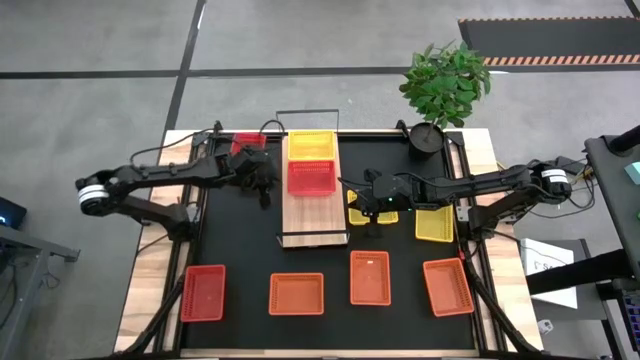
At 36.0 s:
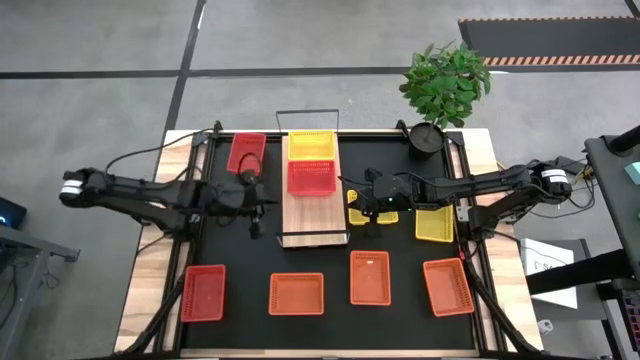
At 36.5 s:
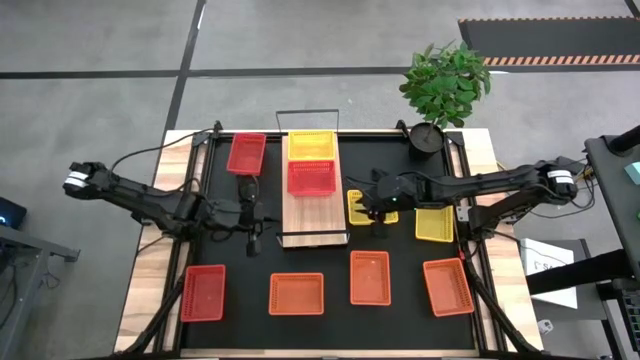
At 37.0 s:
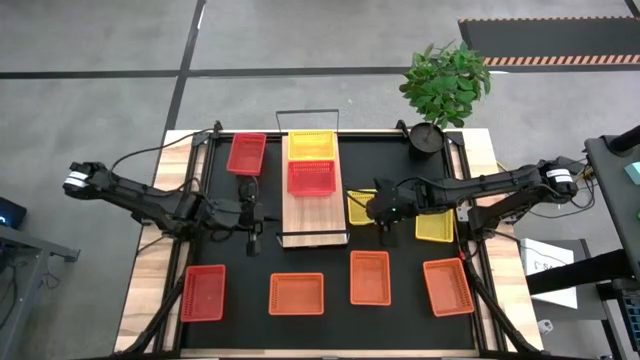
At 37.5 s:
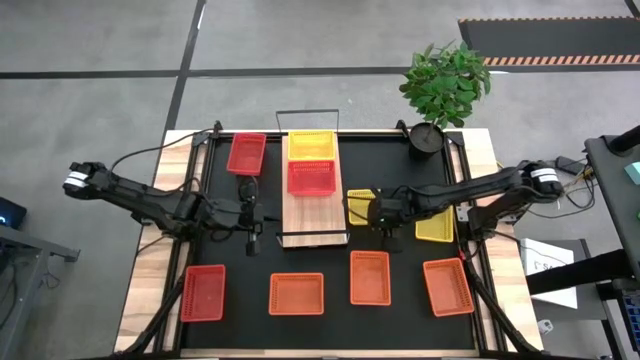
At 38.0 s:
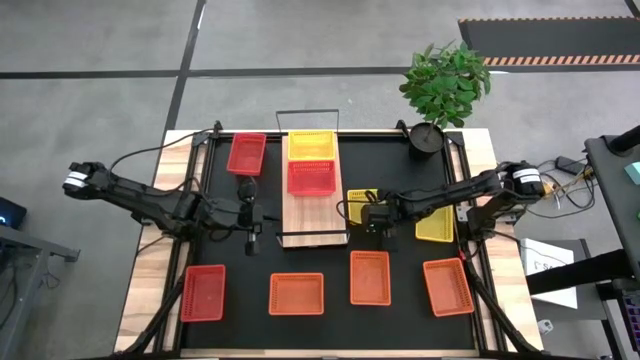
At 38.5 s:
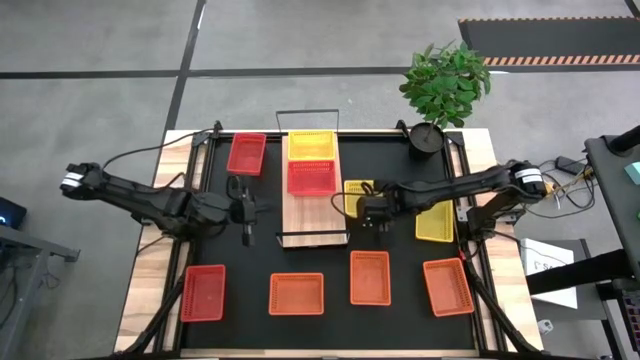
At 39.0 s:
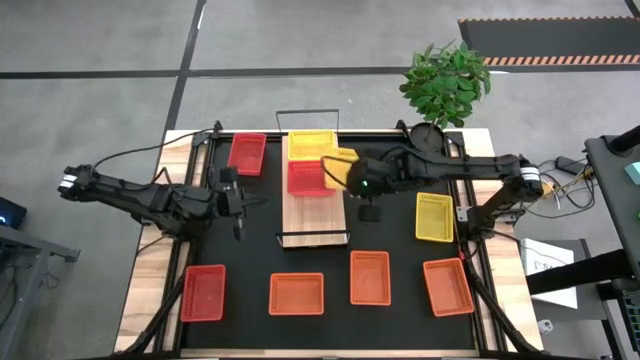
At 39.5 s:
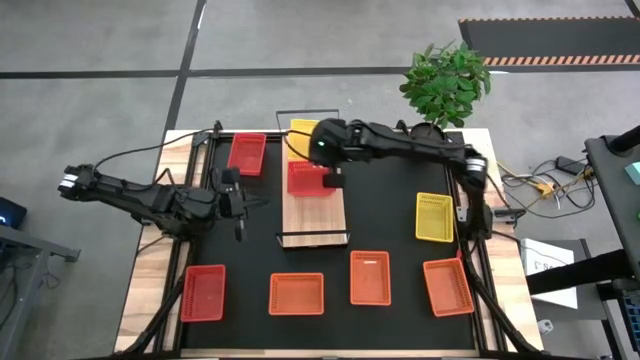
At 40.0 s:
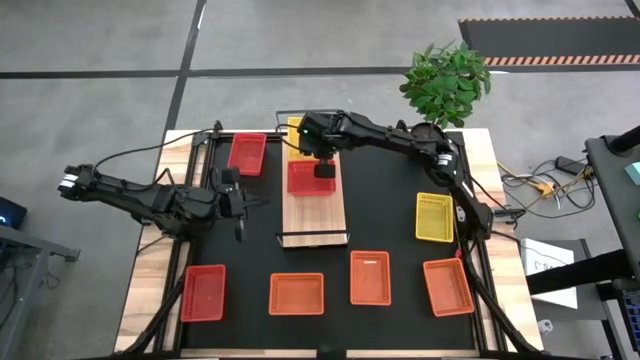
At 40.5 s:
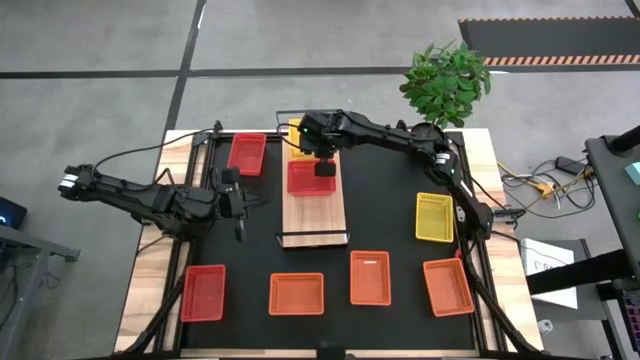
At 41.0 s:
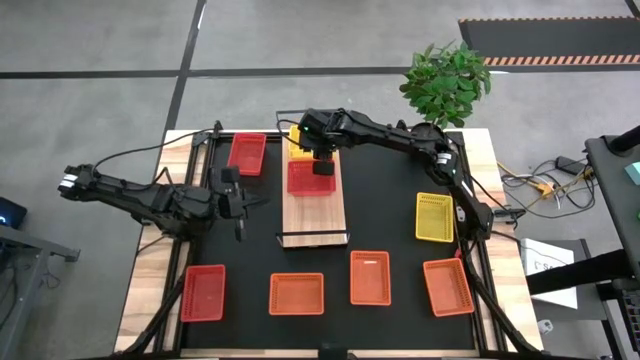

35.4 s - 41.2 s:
Task: Stack baskets on shelf by color
Stack the left yellow bin on the top of the yellow bin on the shelf

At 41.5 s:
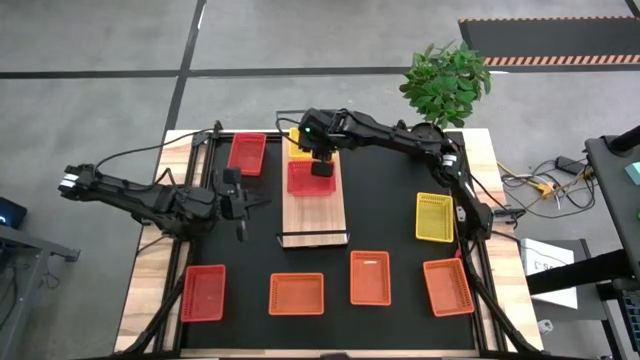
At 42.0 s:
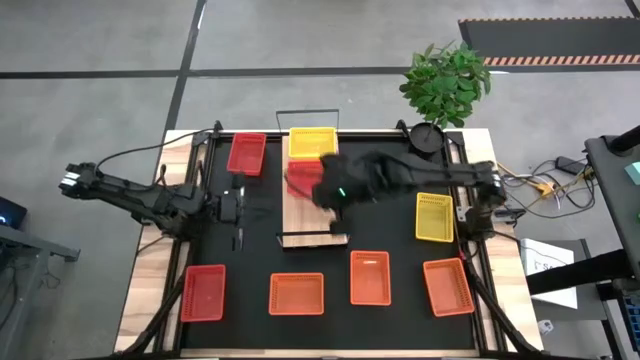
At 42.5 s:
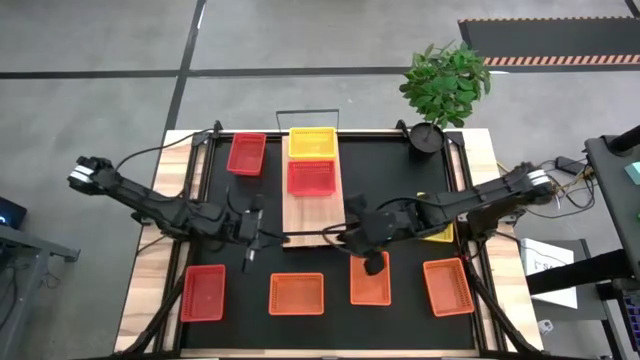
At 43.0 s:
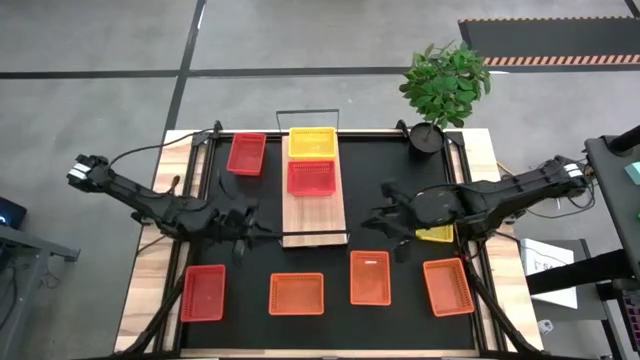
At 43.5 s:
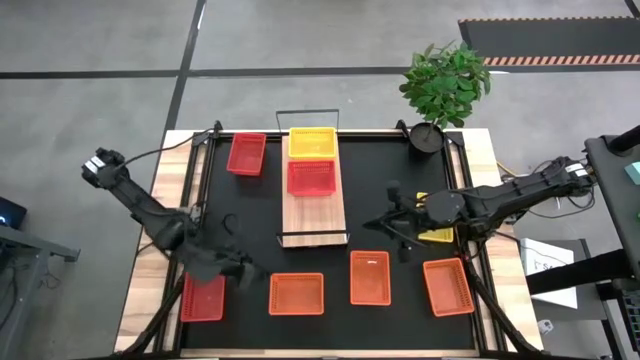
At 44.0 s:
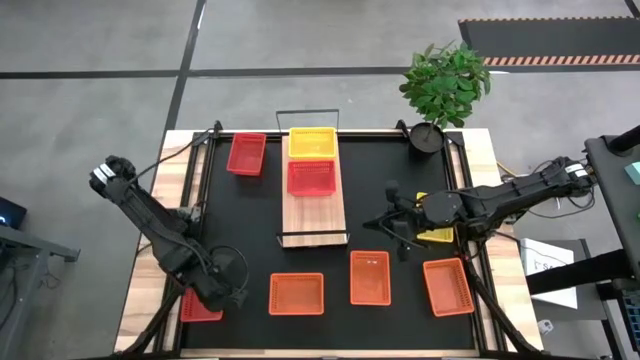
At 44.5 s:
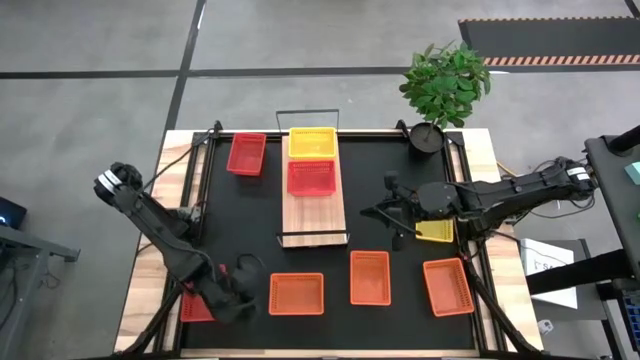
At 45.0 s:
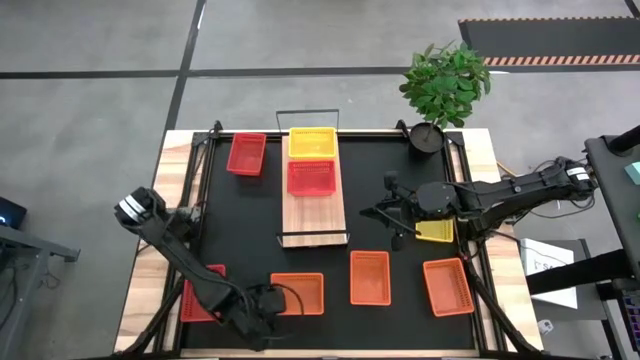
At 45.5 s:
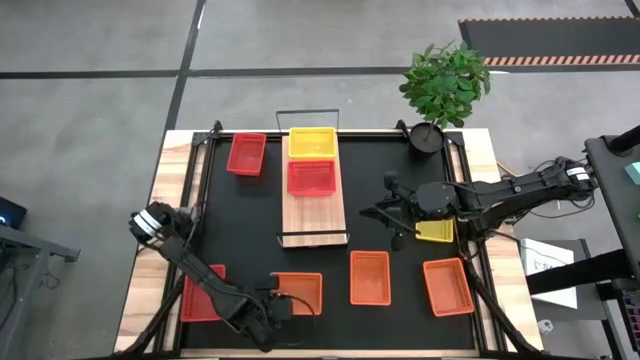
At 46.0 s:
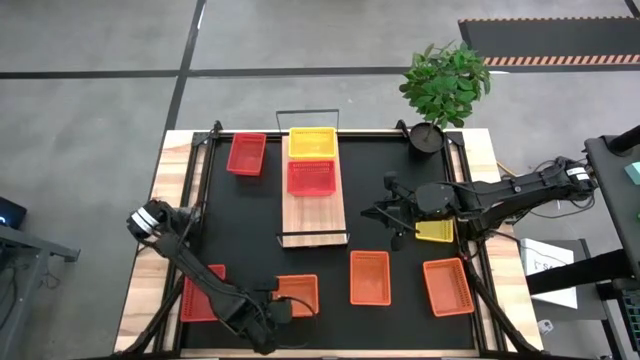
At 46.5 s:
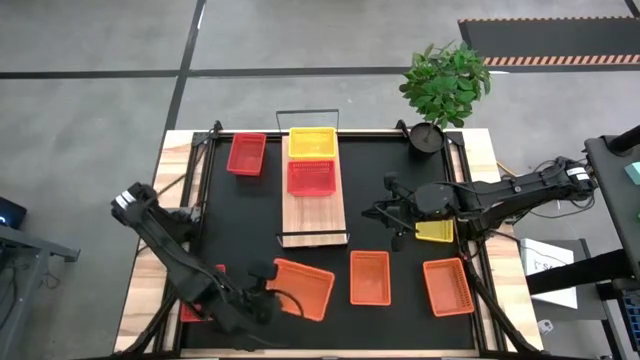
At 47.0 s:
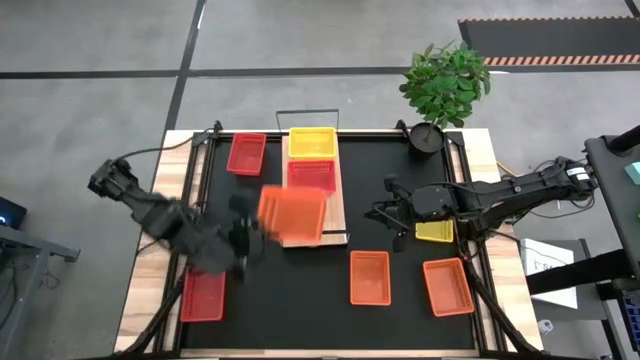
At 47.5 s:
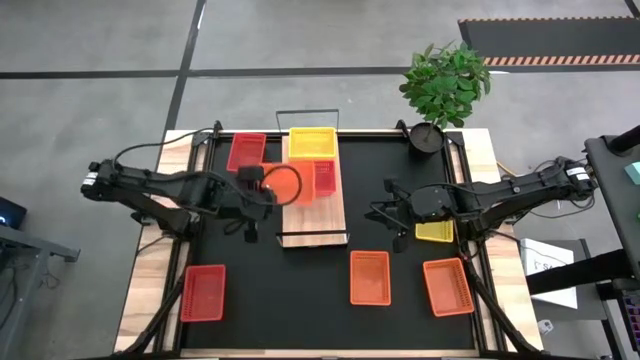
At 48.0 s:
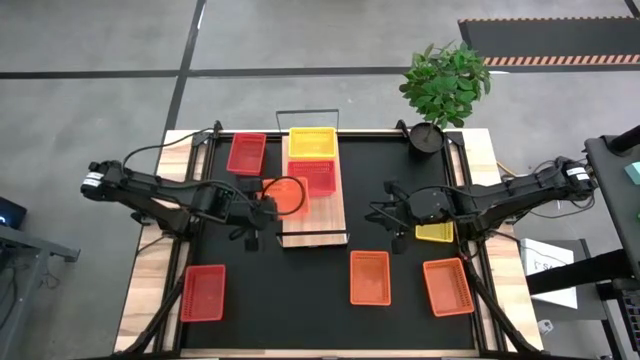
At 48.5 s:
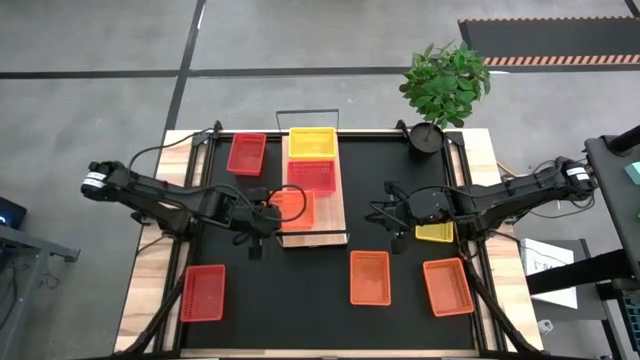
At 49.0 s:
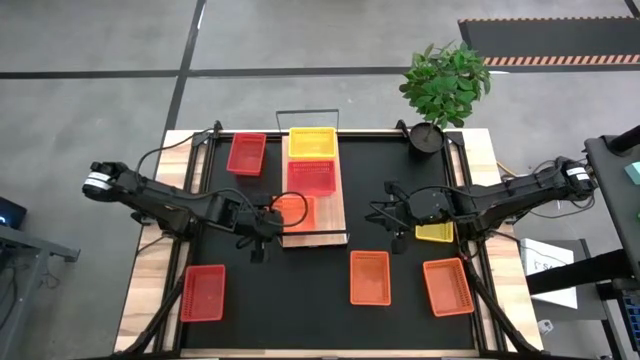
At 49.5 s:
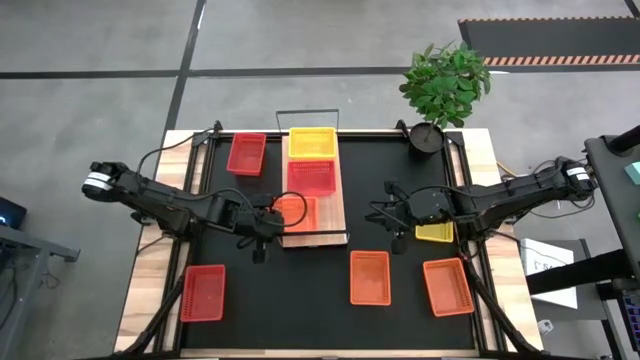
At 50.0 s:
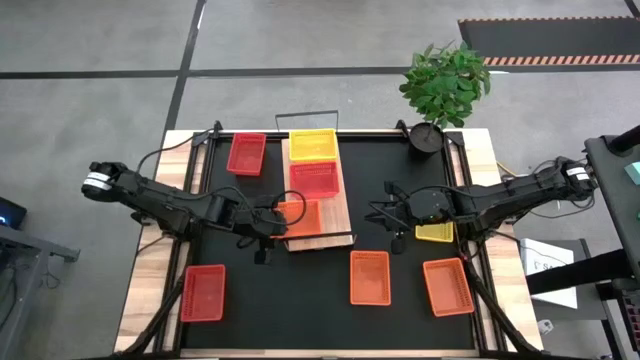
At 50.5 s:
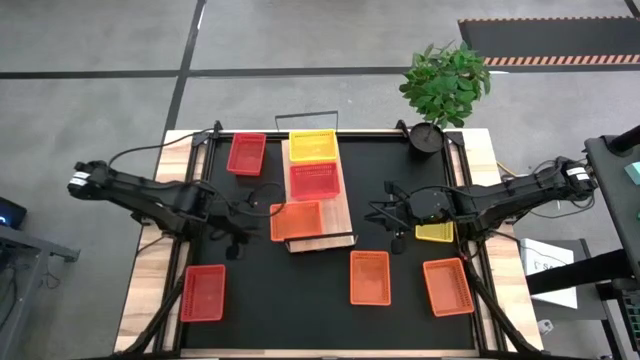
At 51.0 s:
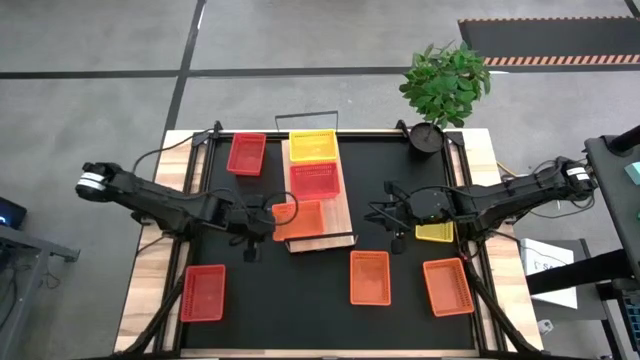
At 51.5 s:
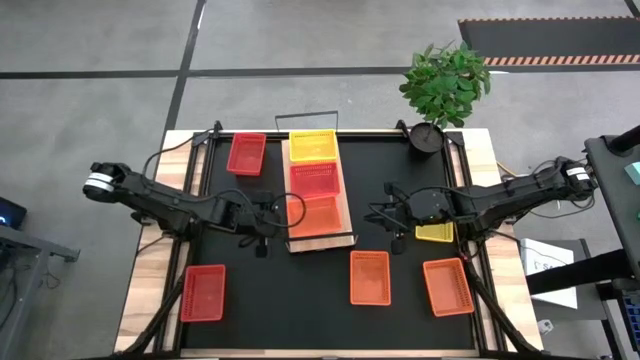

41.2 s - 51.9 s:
Put the left orange bin on the shelf

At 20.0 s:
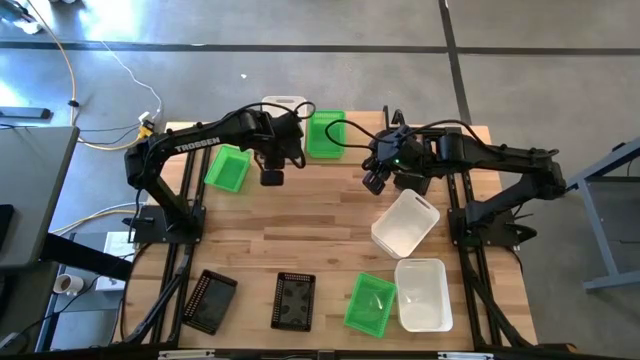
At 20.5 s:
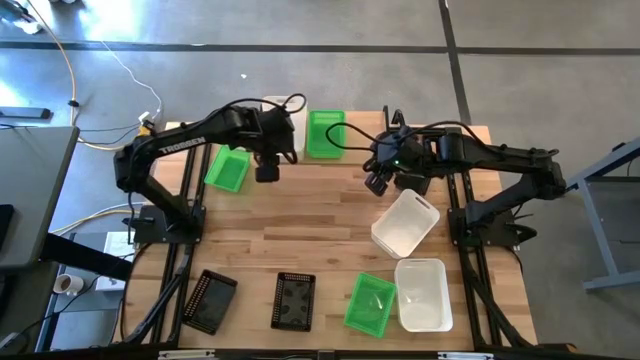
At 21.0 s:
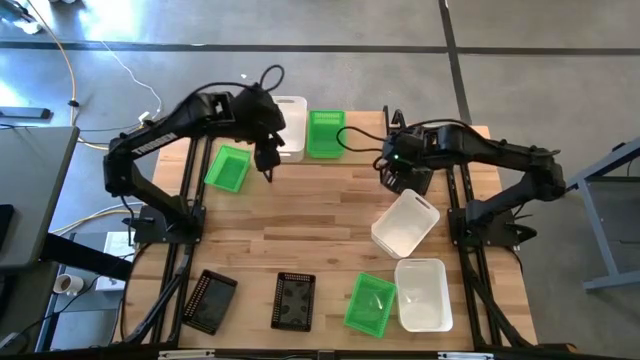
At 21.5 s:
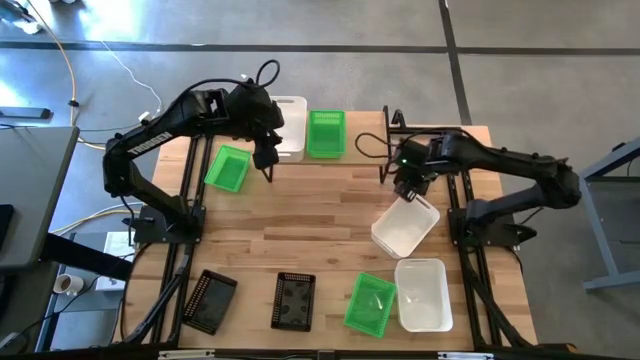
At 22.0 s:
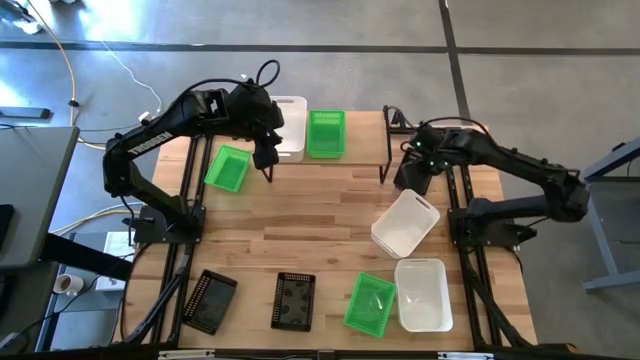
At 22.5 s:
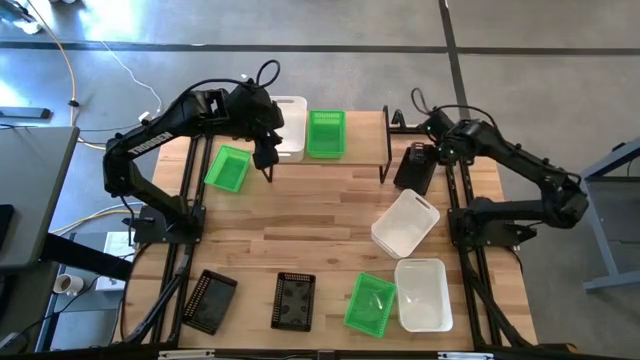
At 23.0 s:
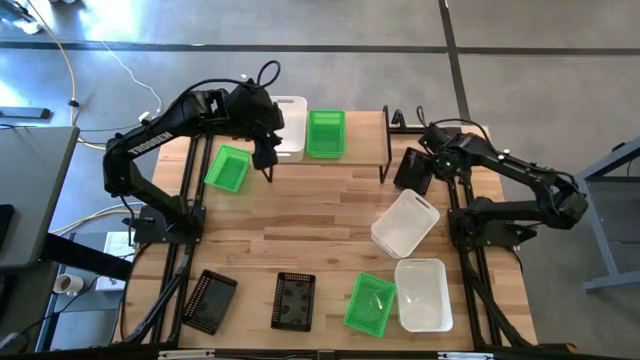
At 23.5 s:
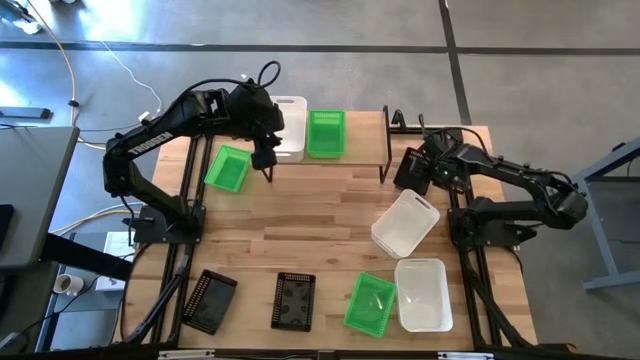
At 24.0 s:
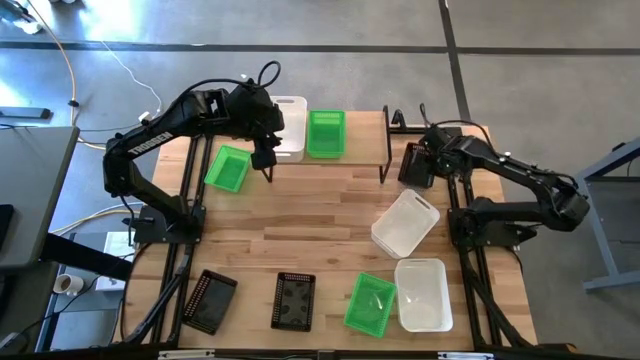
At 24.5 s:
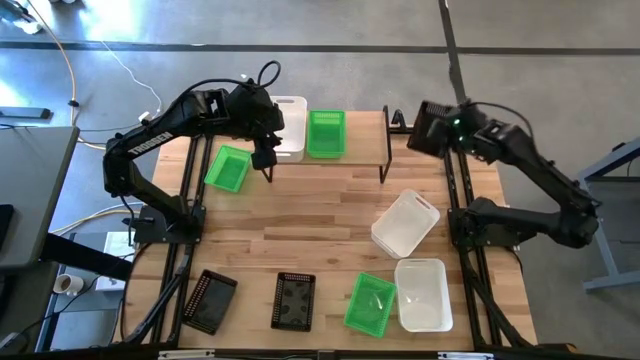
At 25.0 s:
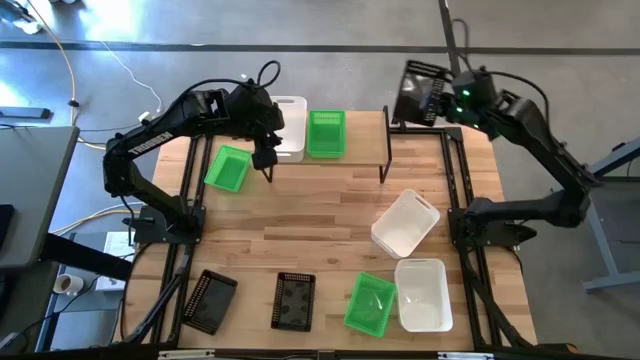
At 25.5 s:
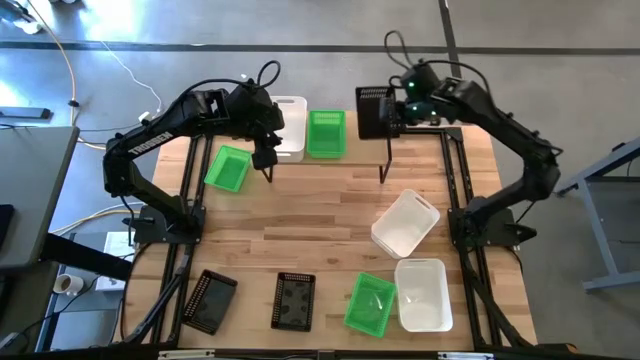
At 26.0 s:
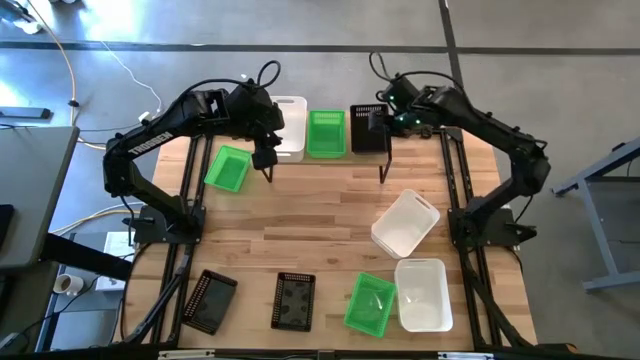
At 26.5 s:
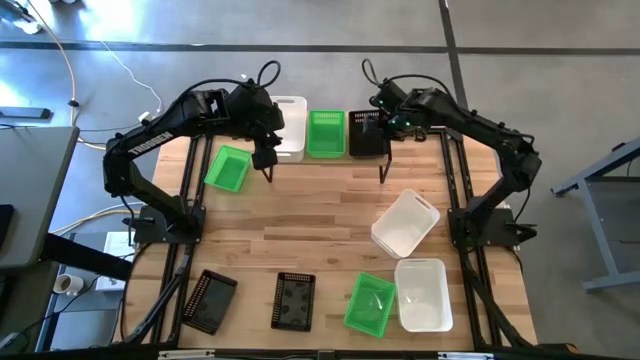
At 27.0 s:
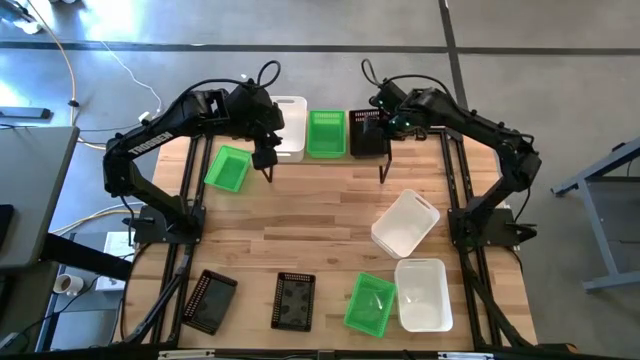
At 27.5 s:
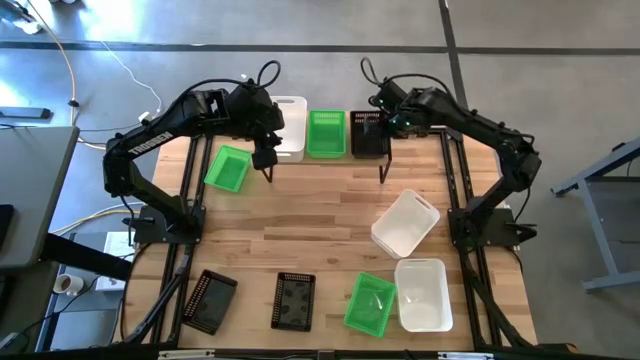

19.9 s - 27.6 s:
Task: Stack baskets on shelf by color
Put the top right black bin on the shelf
